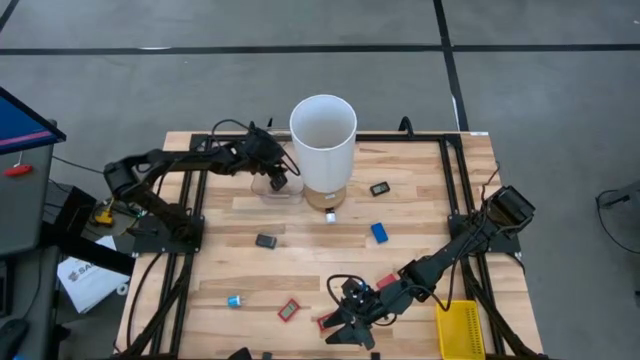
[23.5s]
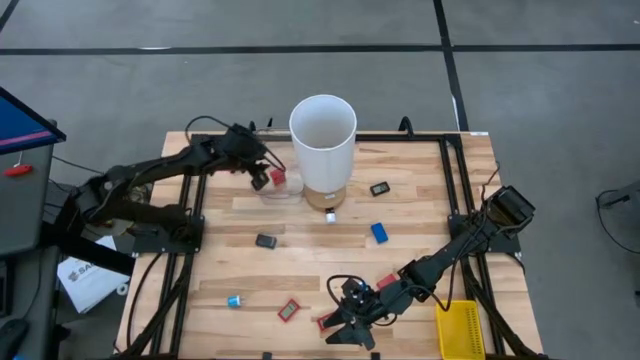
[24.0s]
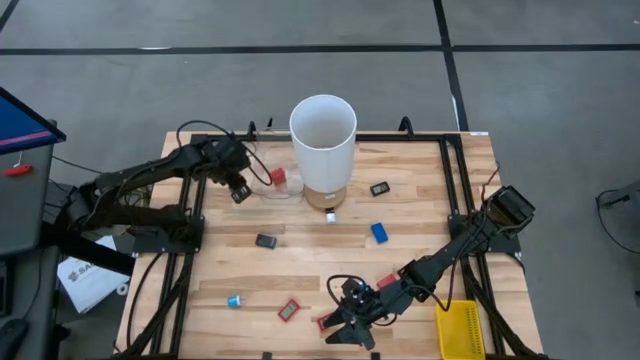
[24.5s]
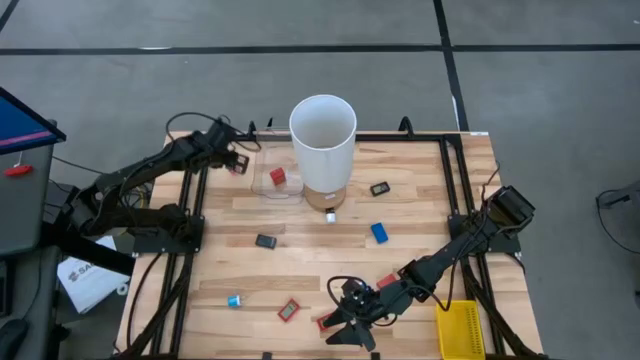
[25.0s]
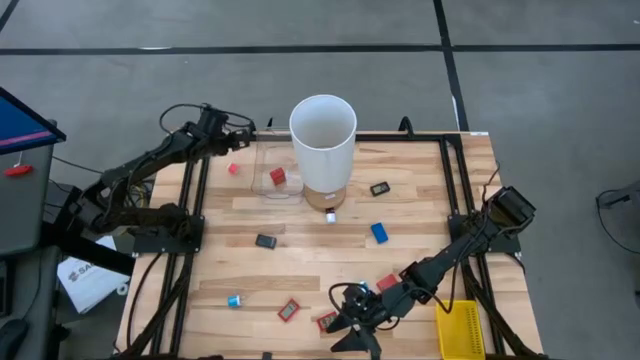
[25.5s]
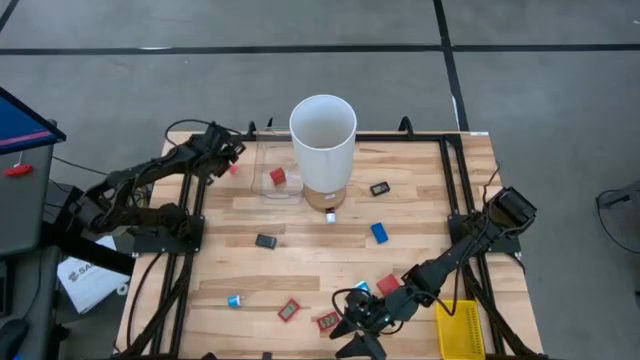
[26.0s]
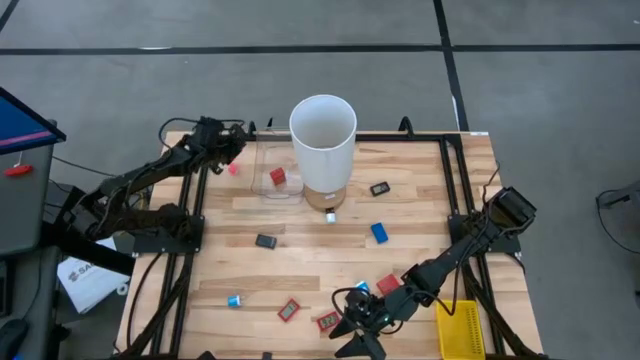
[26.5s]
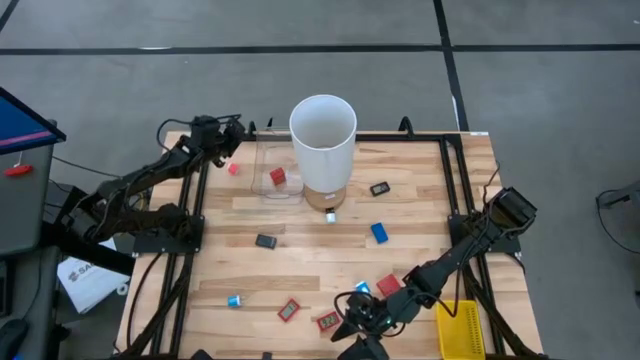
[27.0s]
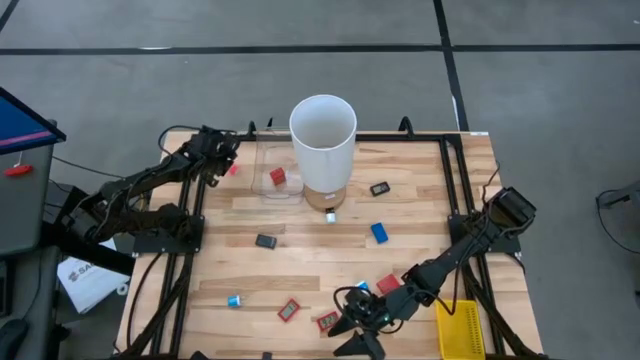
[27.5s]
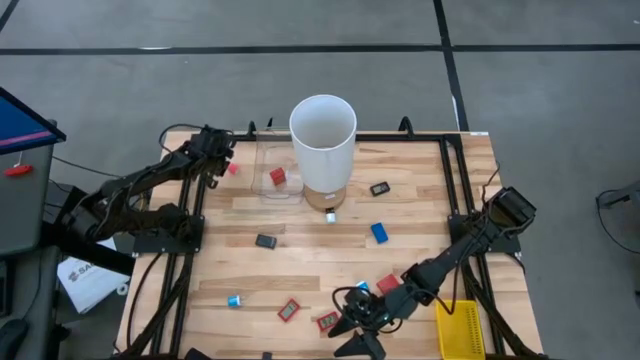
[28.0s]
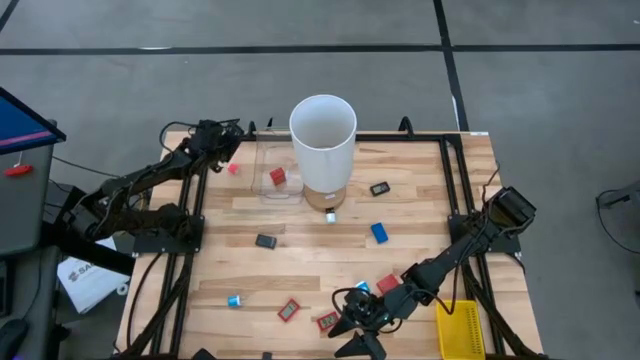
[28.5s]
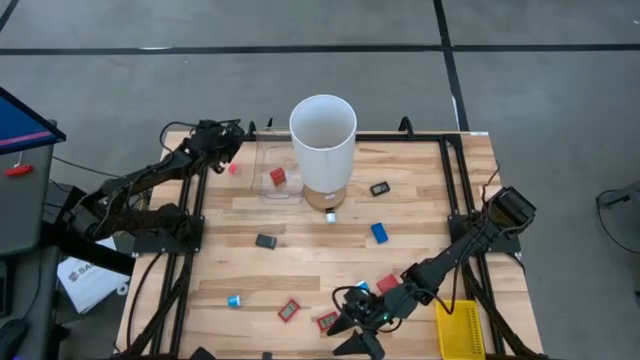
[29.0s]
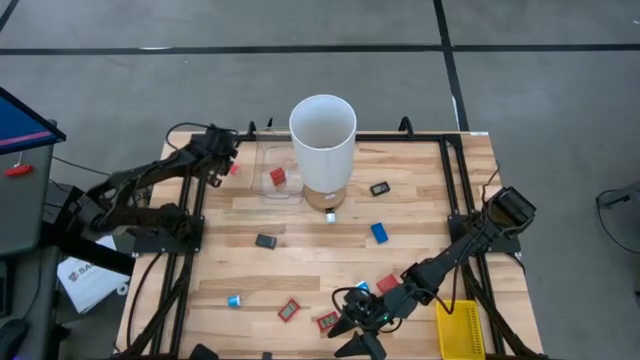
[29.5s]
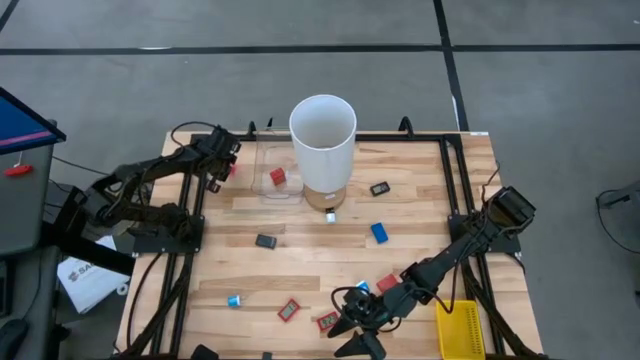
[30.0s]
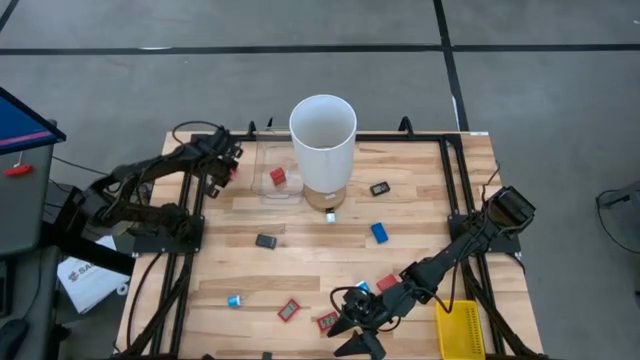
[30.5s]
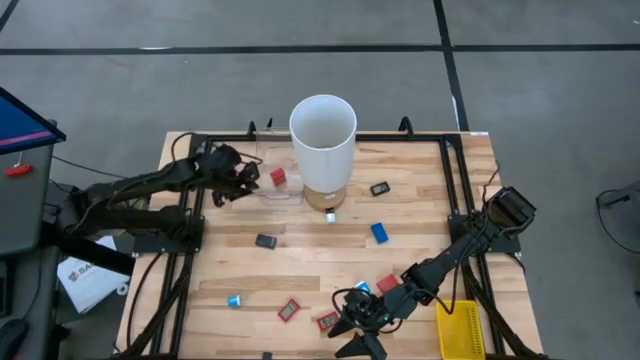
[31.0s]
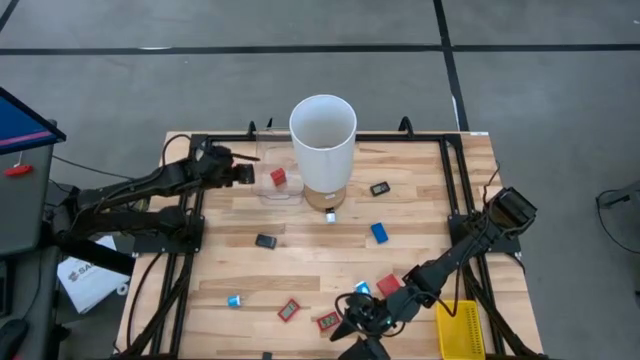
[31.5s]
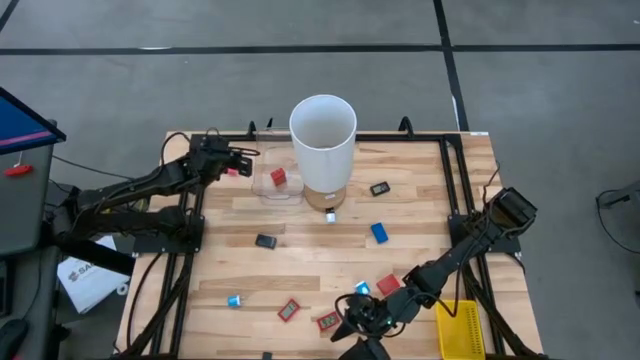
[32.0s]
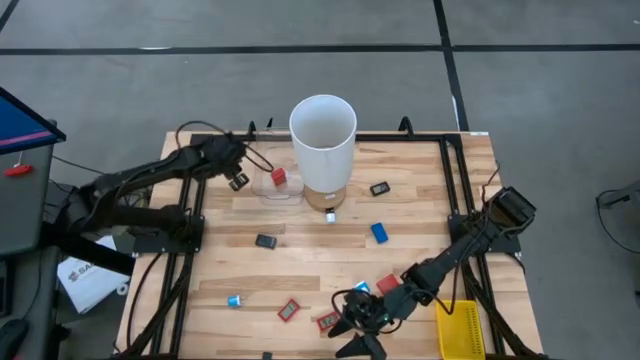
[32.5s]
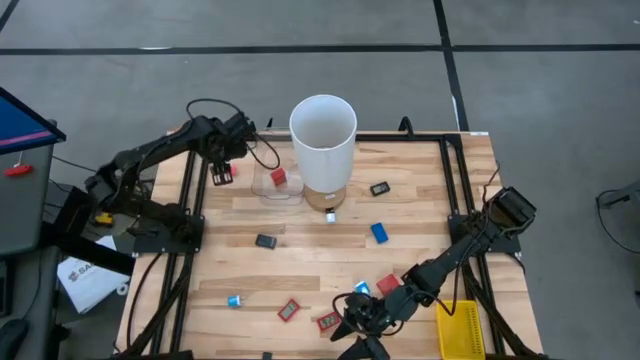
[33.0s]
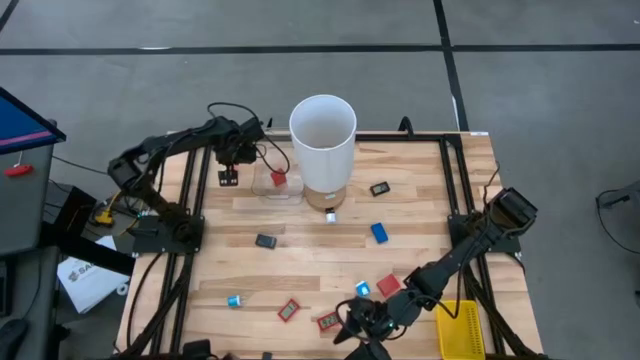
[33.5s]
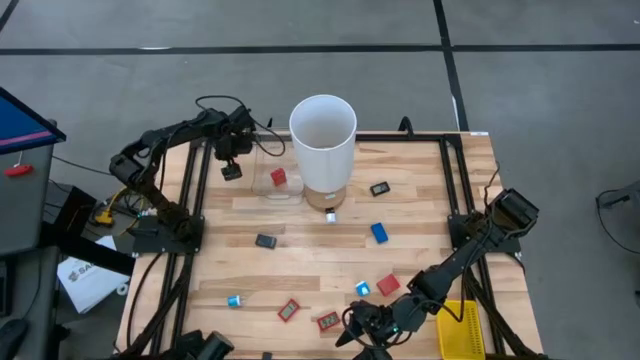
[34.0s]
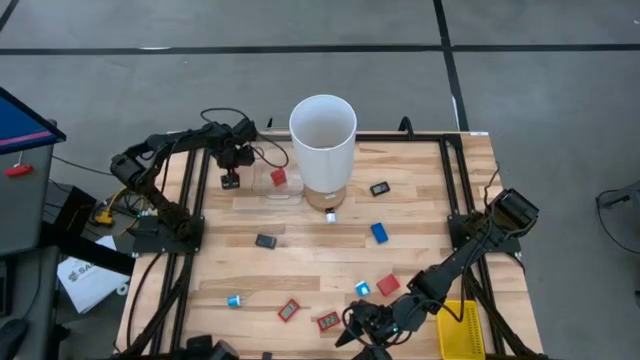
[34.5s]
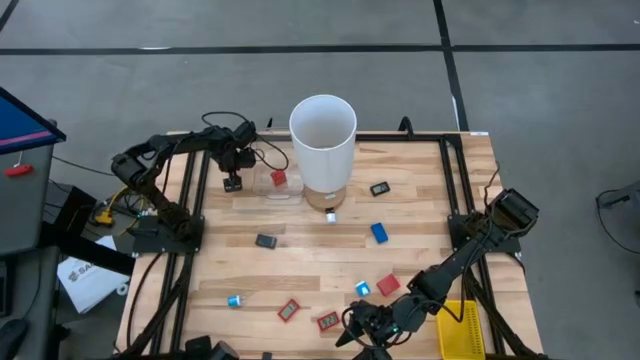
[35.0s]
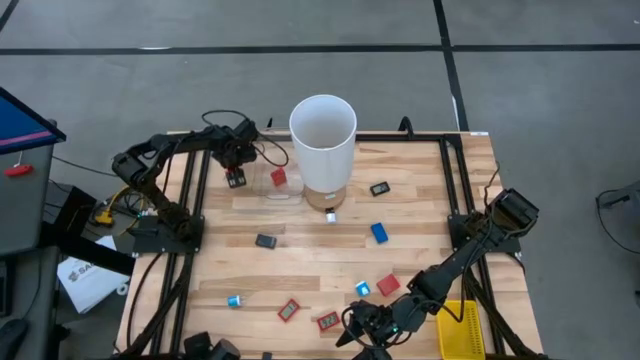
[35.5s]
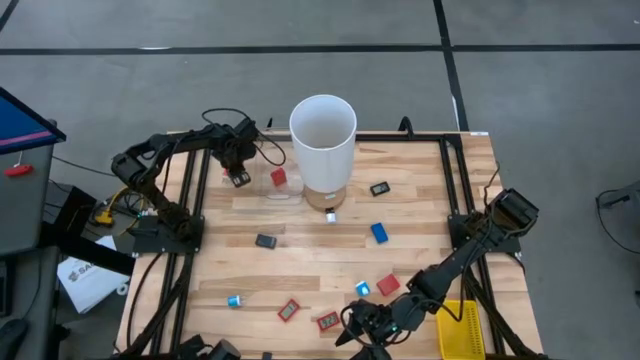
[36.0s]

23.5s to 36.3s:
Task: Pick & Place Office items
Put the pink charger adapter into the transparent bin

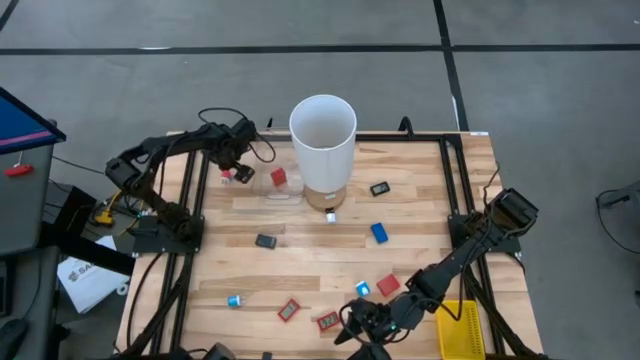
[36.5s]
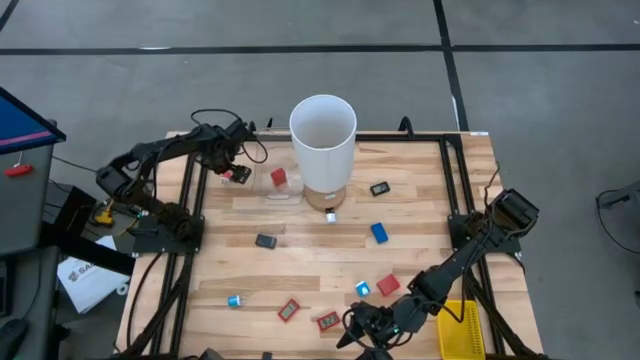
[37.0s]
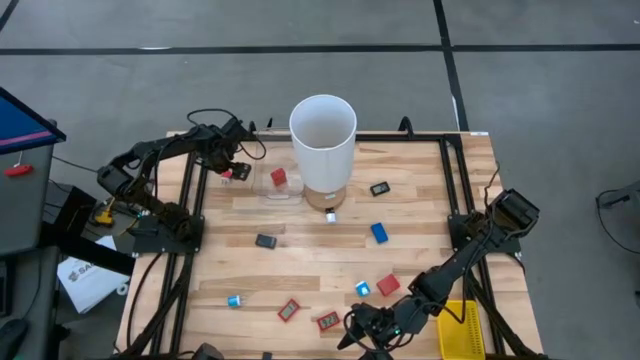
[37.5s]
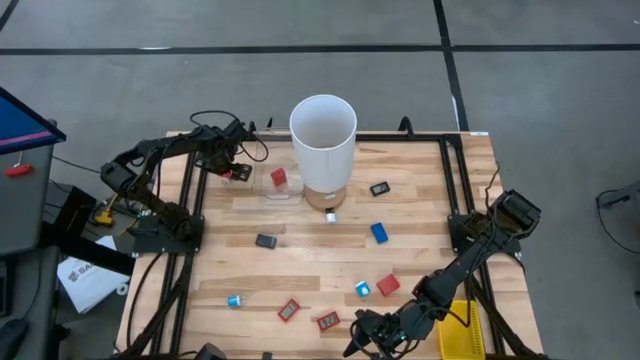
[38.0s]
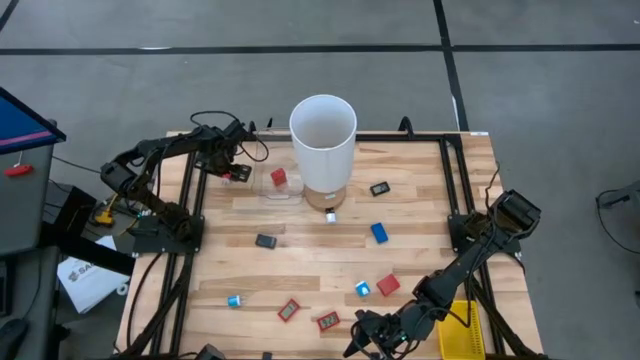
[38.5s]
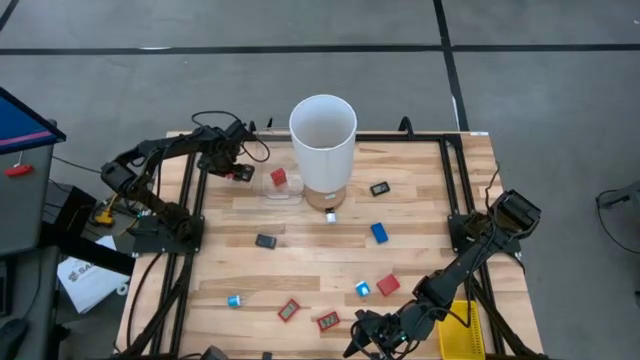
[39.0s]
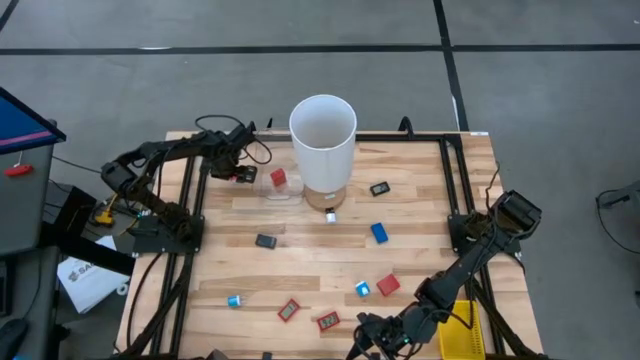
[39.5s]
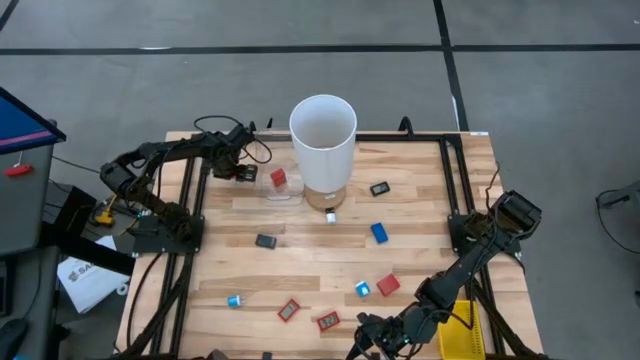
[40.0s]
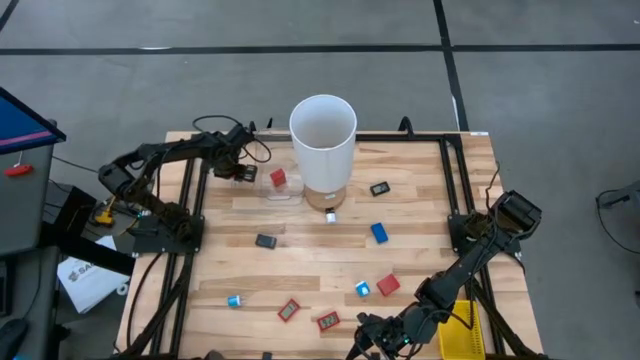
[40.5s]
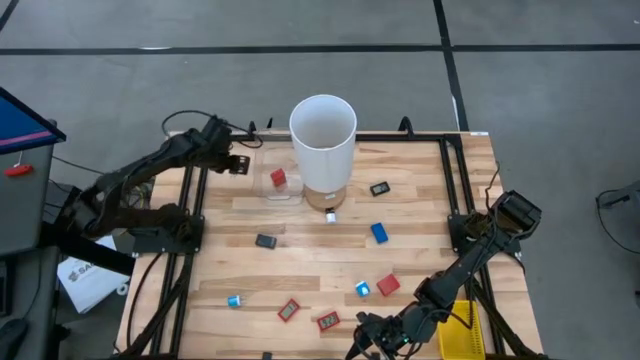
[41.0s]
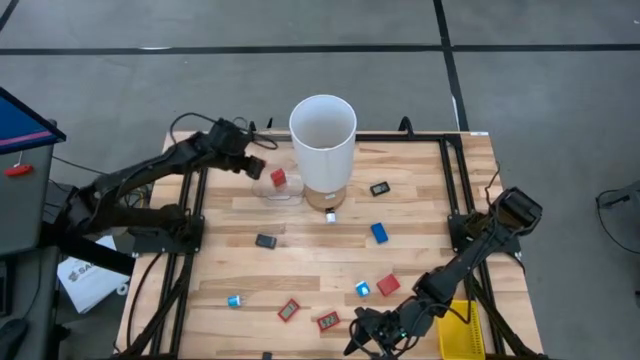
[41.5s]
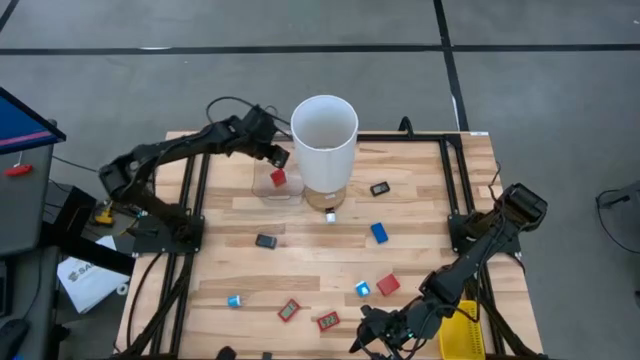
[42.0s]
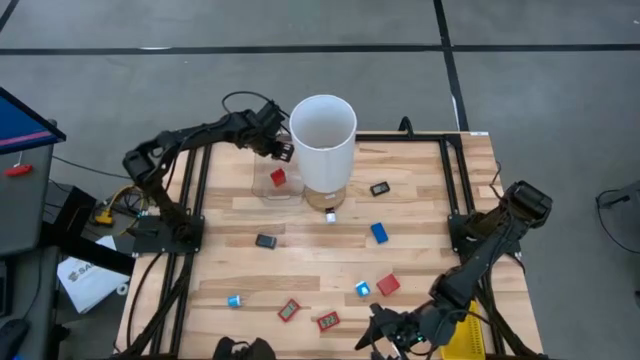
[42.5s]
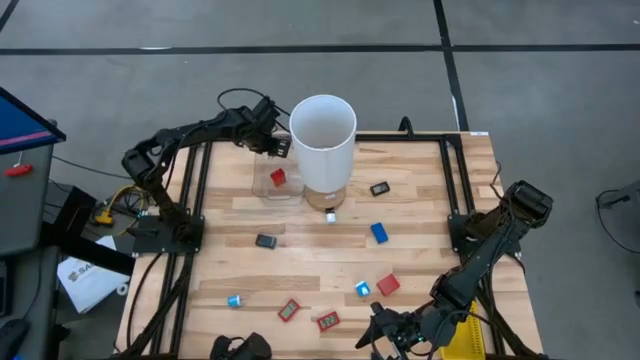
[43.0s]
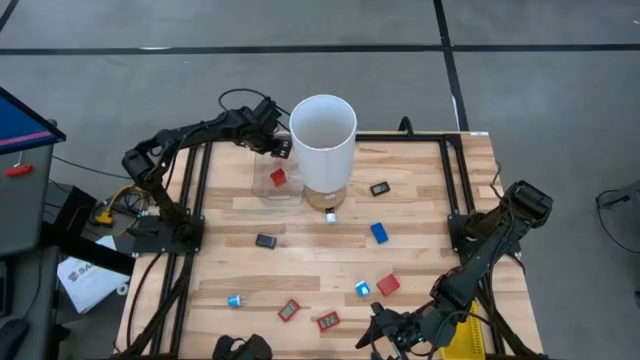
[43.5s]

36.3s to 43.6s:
Put the pink charger adapter into the transparent bin

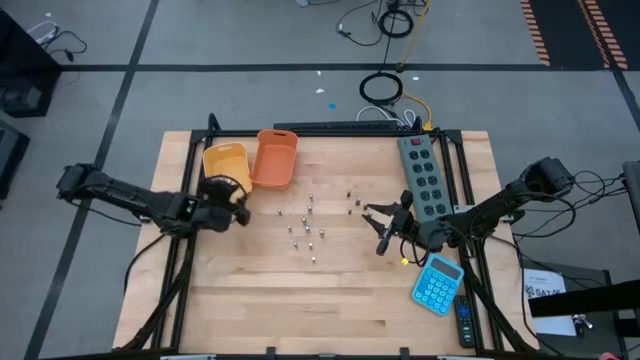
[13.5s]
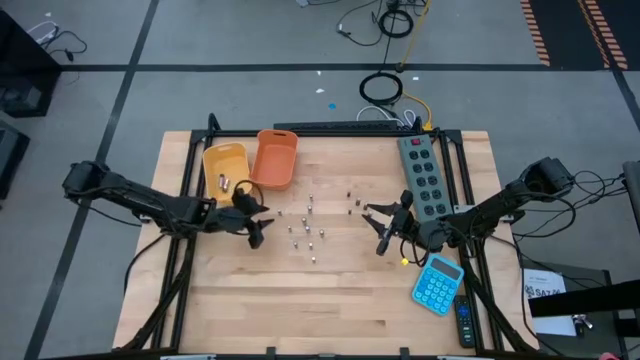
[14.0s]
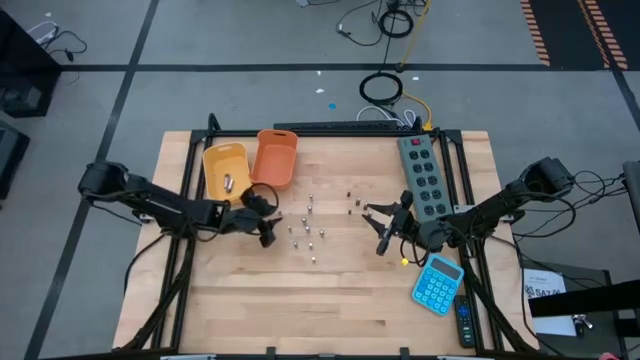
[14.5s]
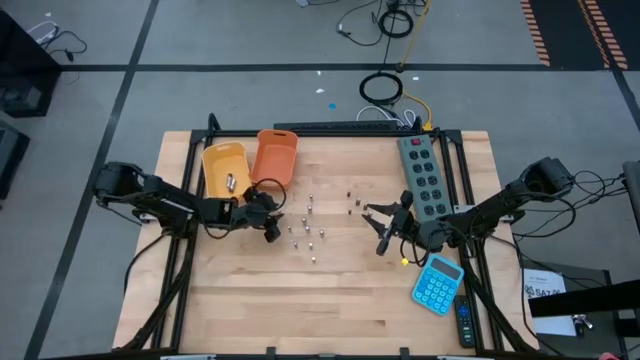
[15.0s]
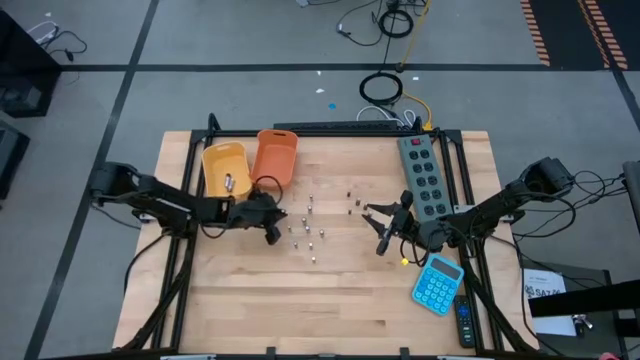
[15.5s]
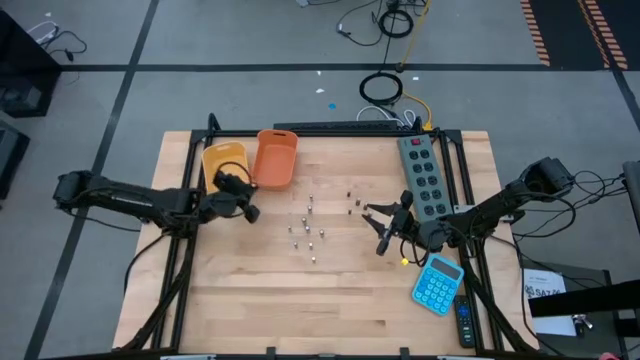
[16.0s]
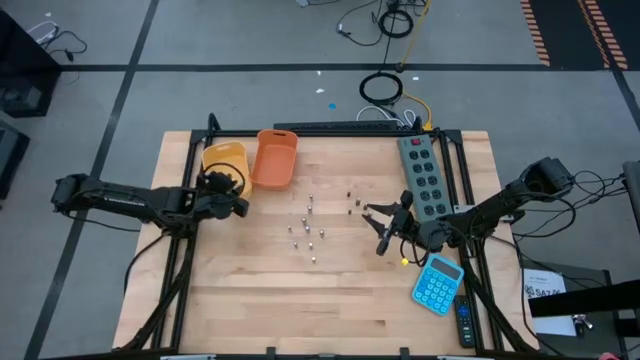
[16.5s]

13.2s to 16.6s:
Task: Sort batteries
Put the silver battery into the yellow bin
